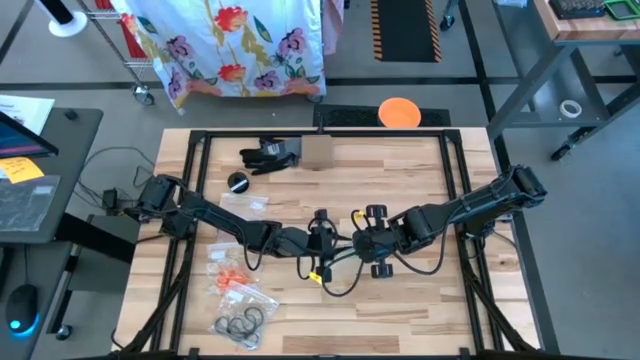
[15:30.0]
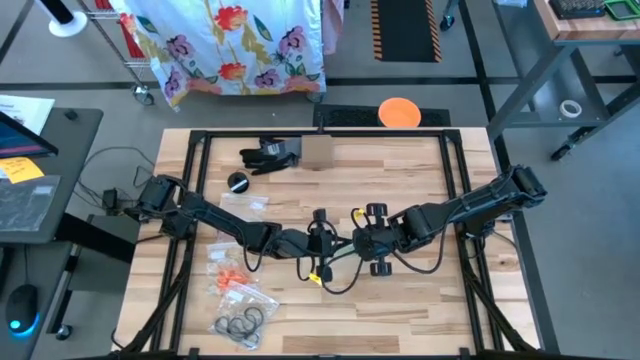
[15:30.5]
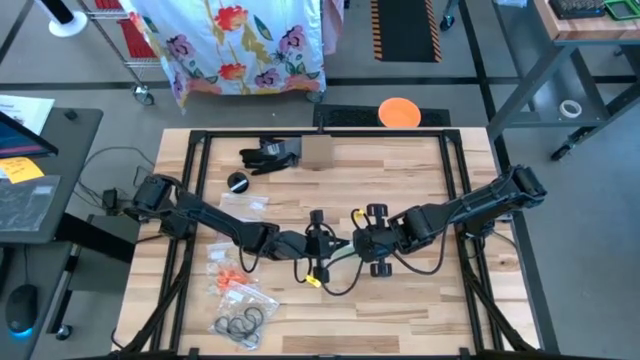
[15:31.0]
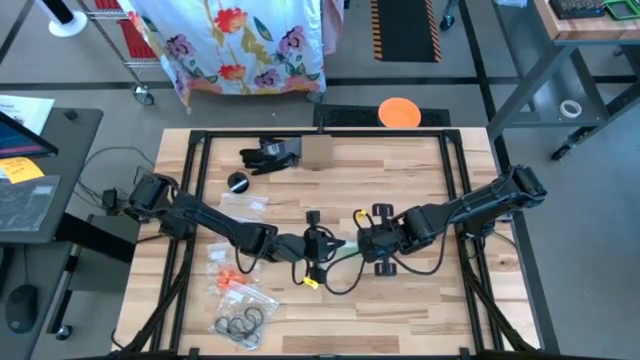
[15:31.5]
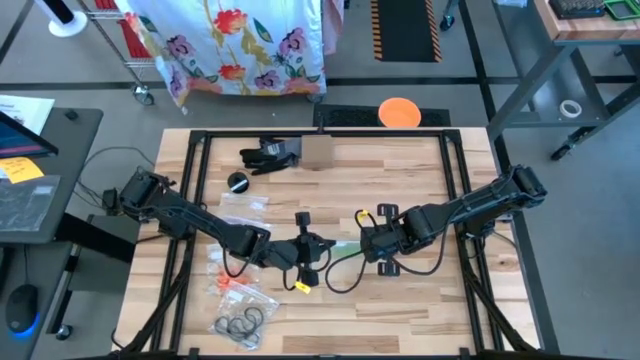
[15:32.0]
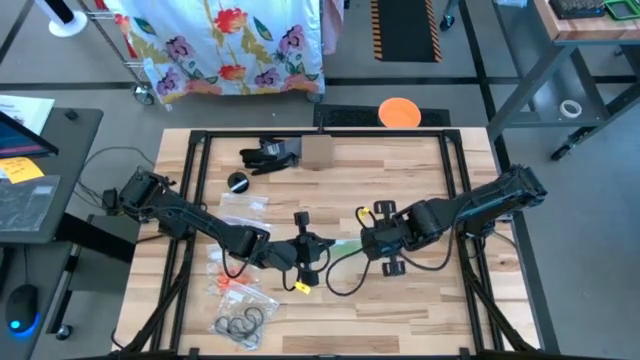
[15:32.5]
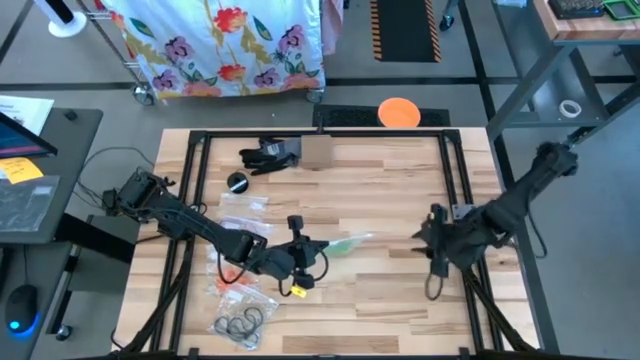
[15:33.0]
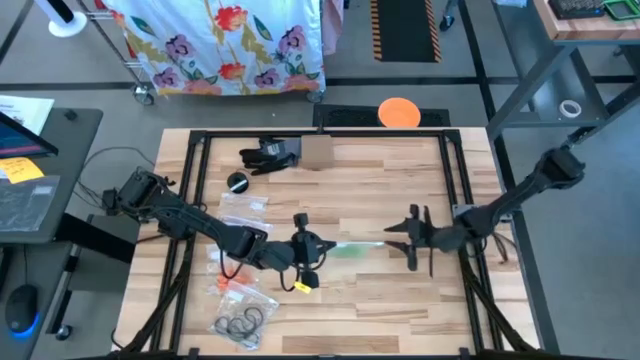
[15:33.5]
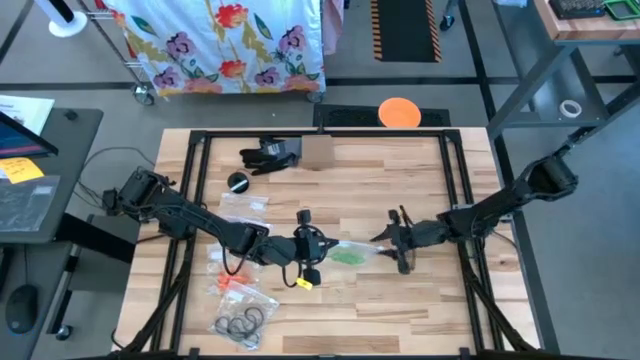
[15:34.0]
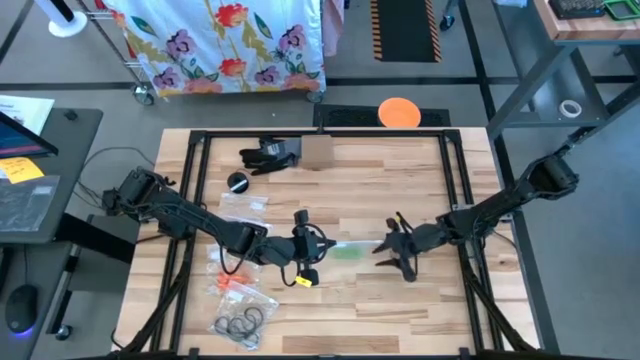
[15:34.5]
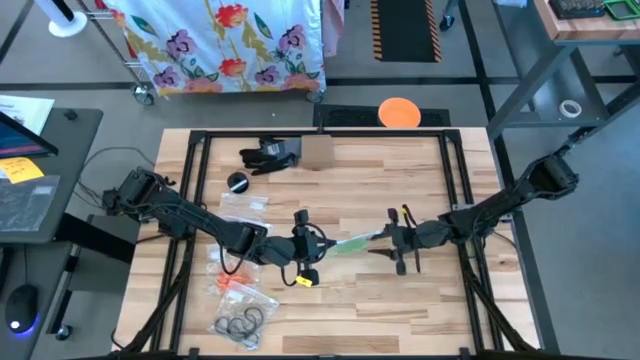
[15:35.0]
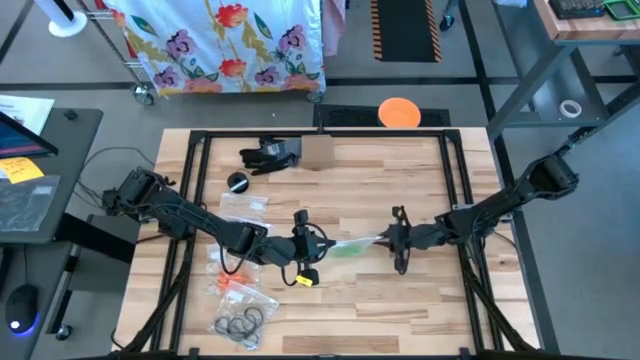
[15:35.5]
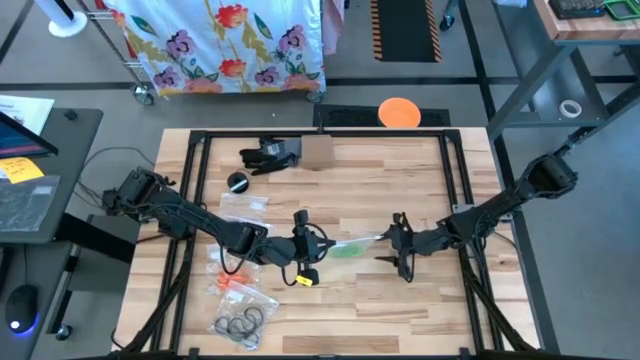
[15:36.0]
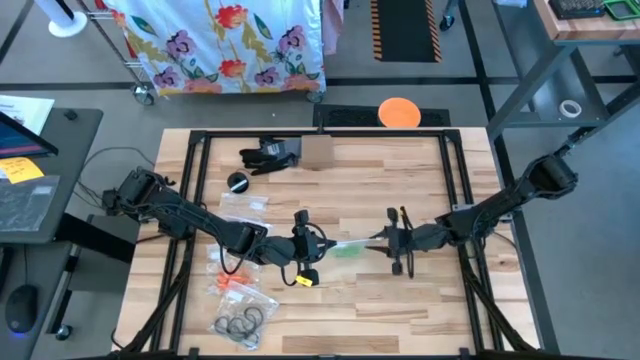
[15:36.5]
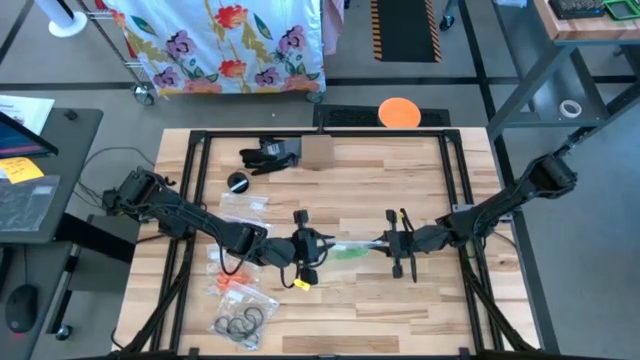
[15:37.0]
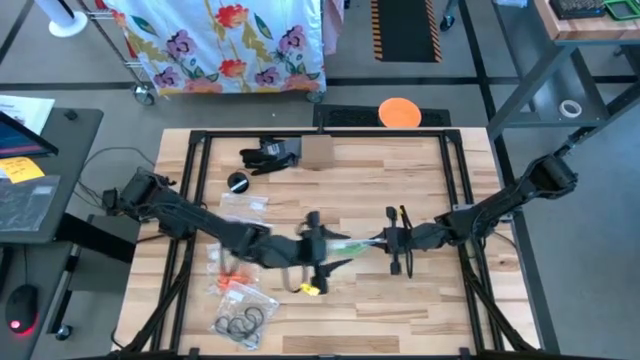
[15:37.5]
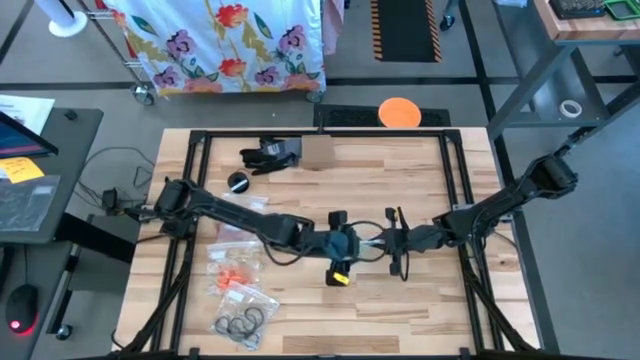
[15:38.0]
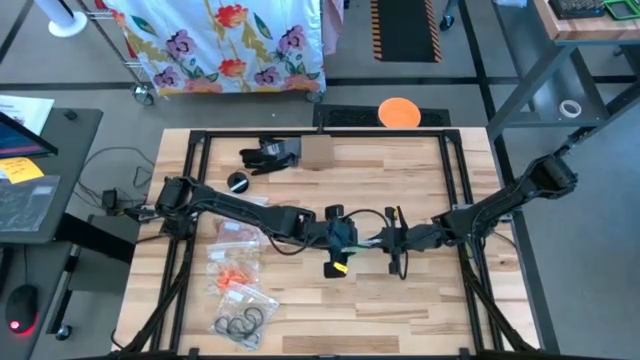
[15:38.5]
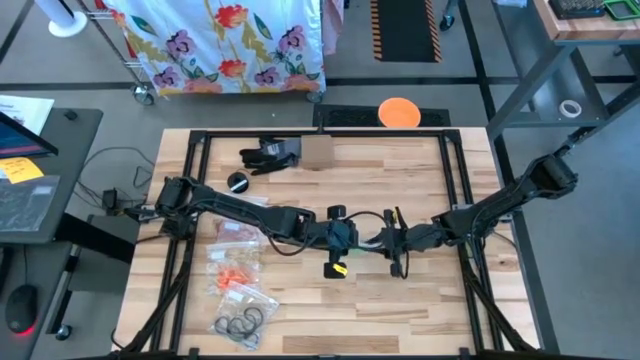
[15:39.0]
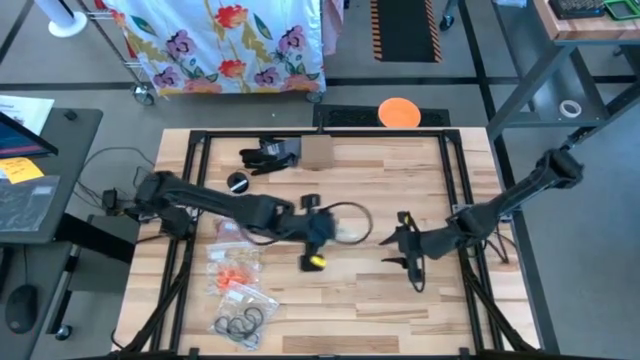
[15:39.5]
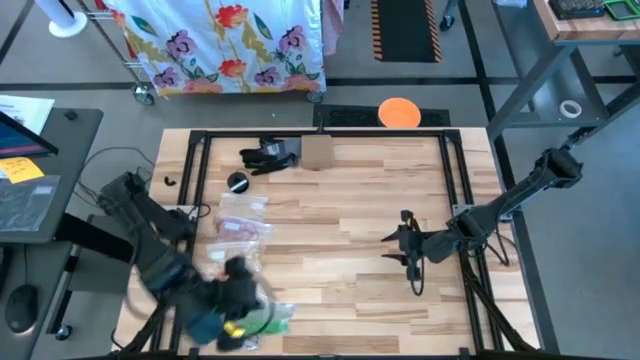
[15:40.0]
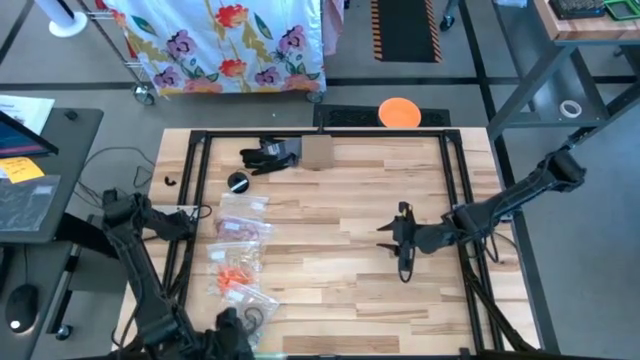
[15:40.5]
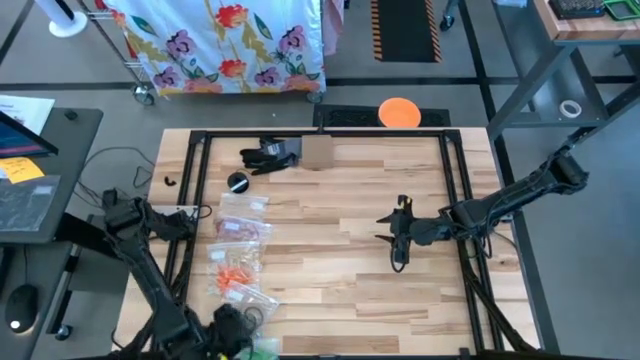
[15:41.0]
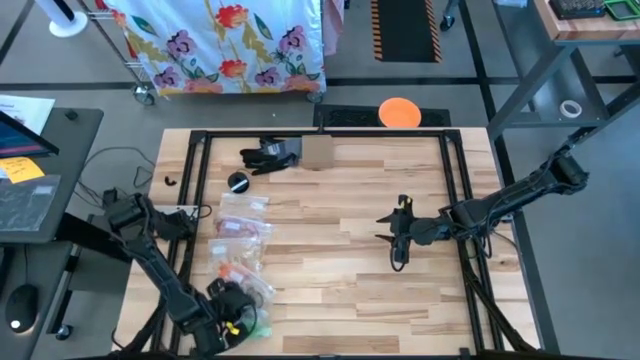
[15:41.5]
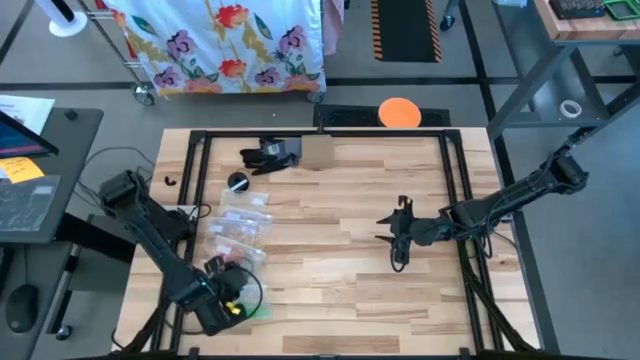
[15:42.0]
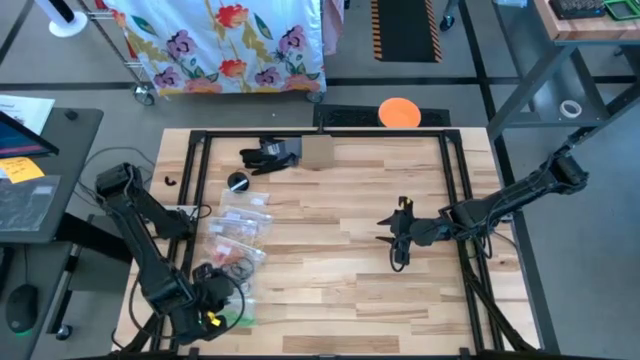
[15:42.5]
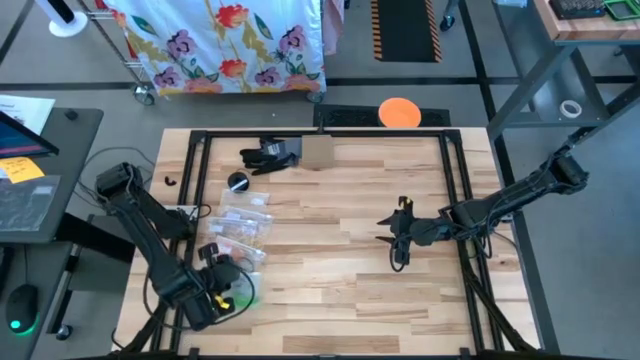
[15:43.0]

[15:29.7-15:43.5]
Task: Sort rubber bands
Close the transparent zip bag

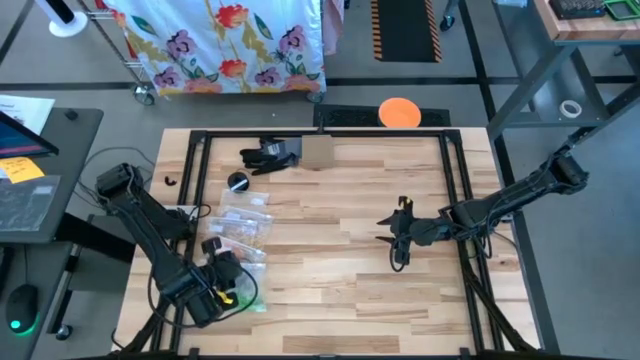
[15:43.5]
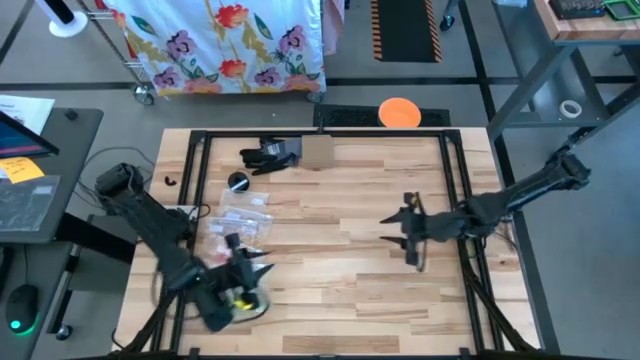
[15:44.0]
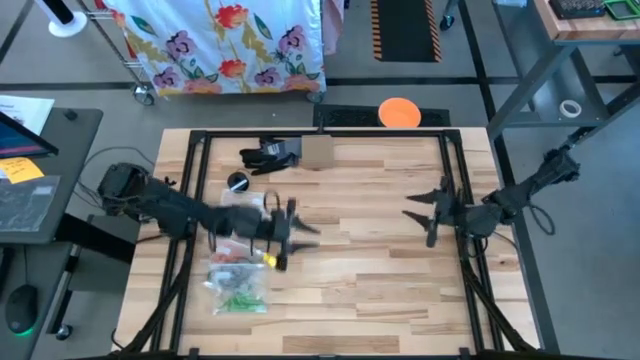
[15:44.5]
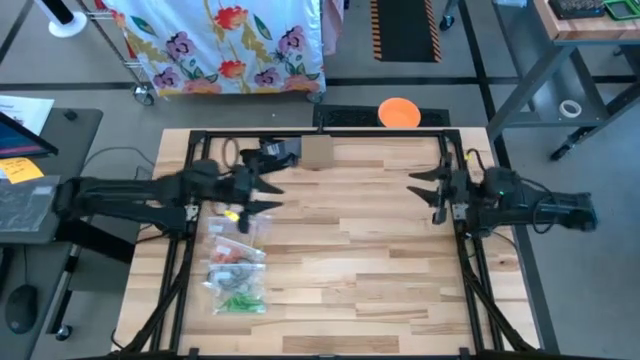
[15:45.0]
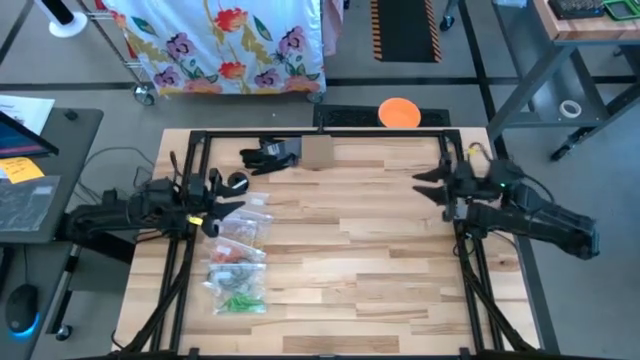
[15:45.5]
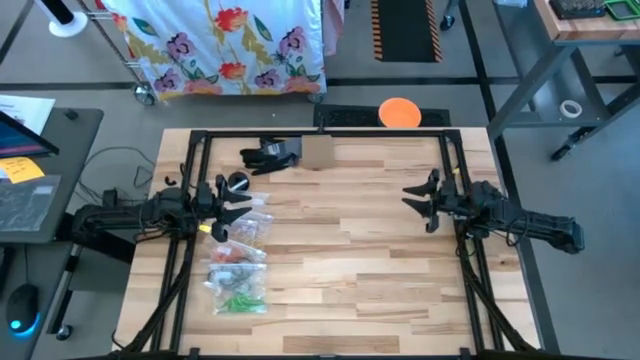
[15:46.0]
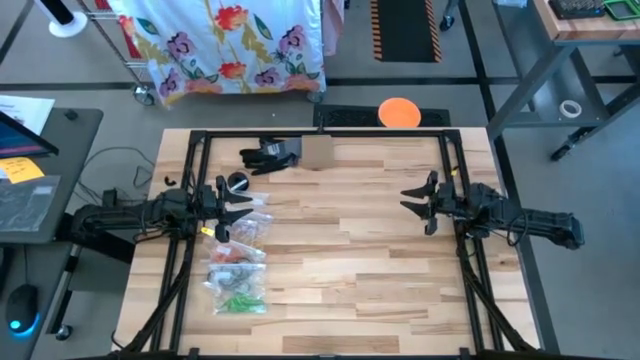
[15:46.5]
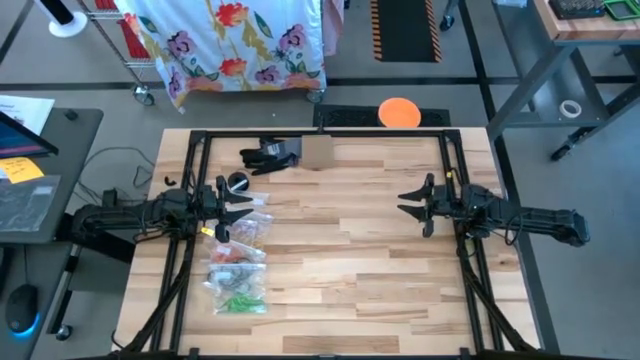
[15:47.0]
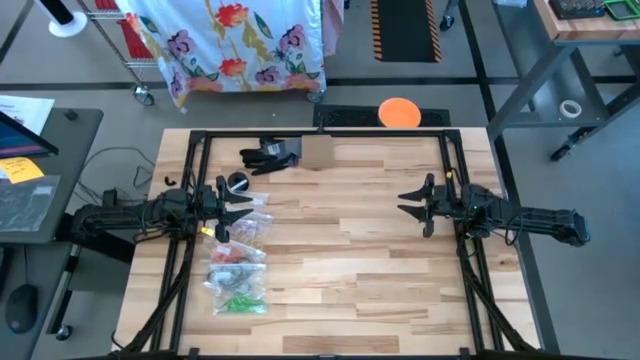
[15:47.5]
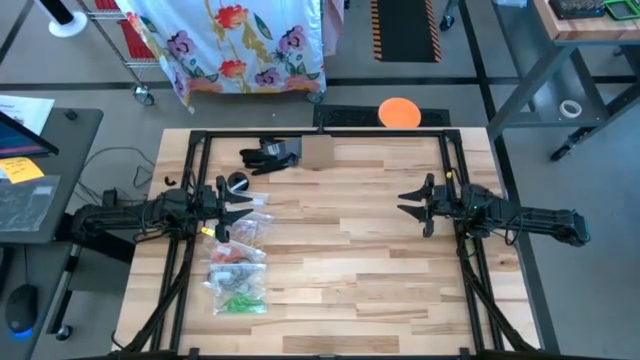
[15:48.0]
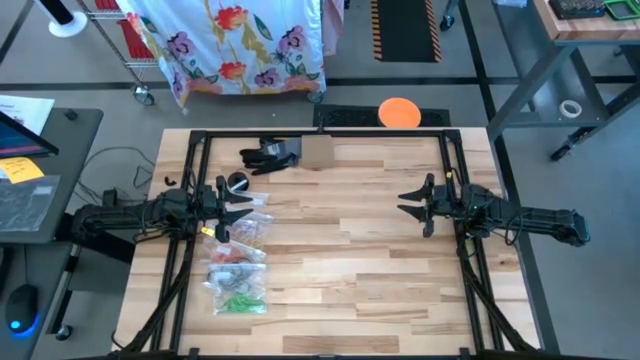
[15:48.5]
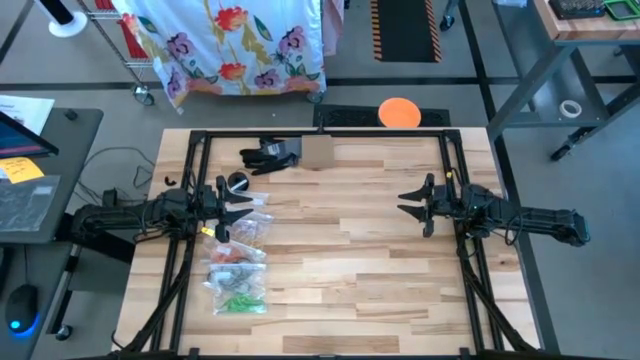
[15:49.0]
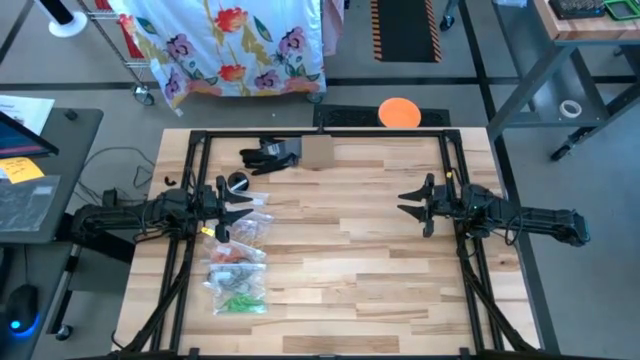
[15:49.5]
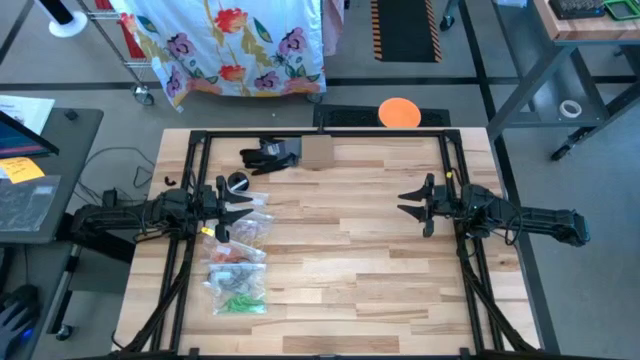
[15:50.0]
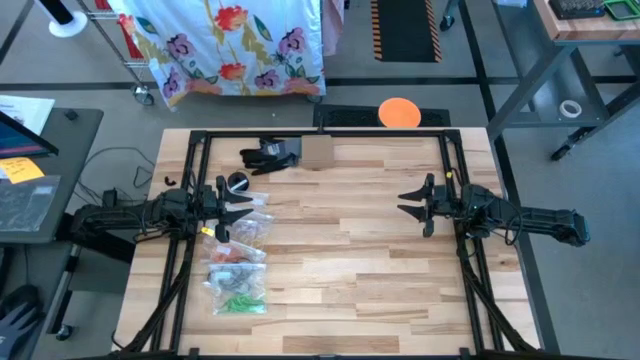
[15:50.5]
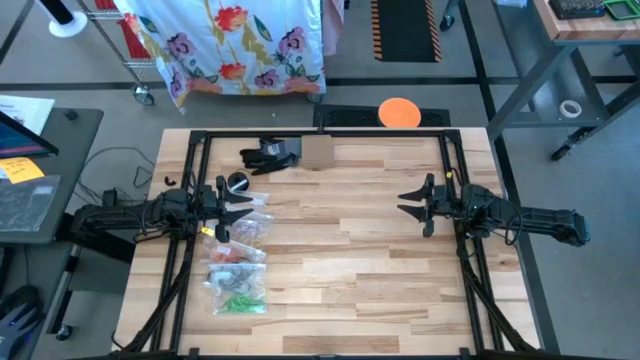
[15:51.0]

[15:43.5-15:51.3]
Return to Home Position
